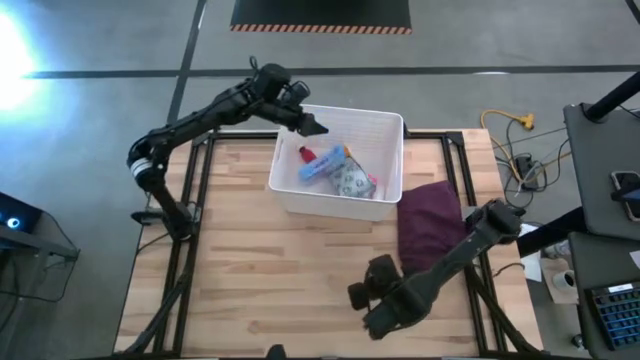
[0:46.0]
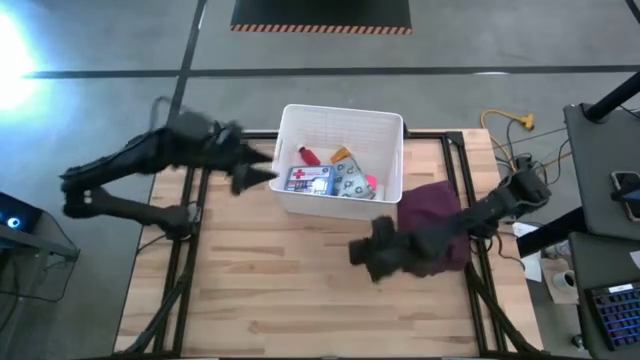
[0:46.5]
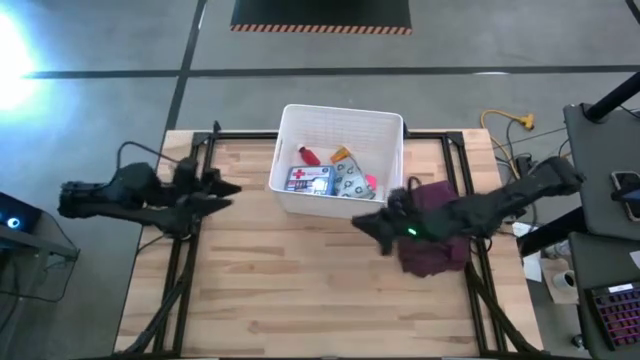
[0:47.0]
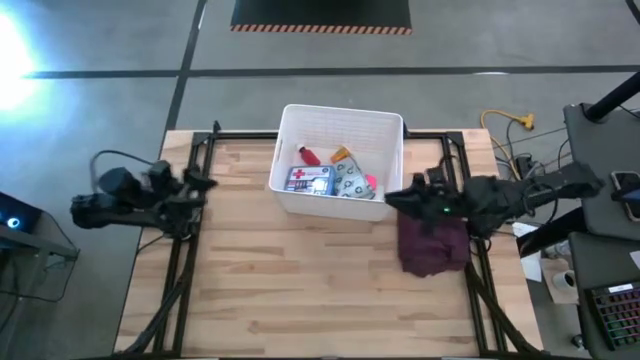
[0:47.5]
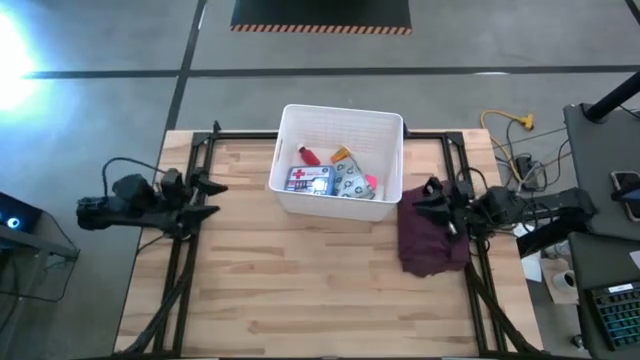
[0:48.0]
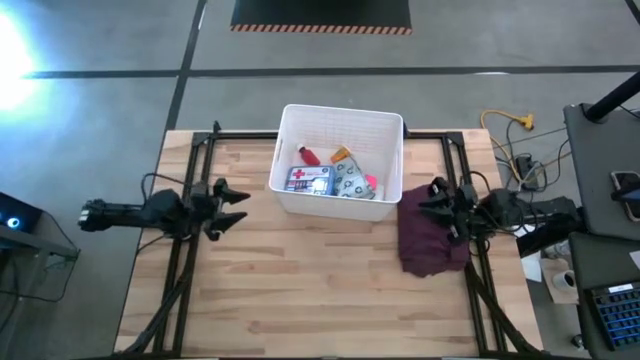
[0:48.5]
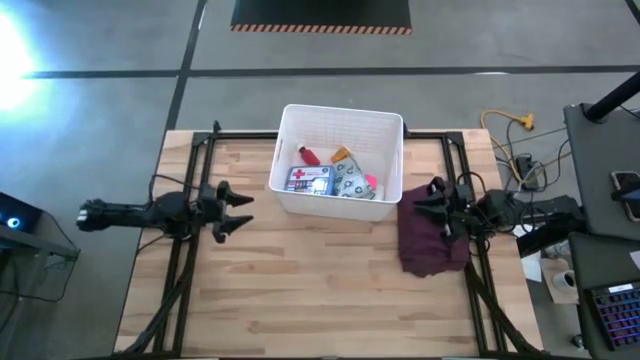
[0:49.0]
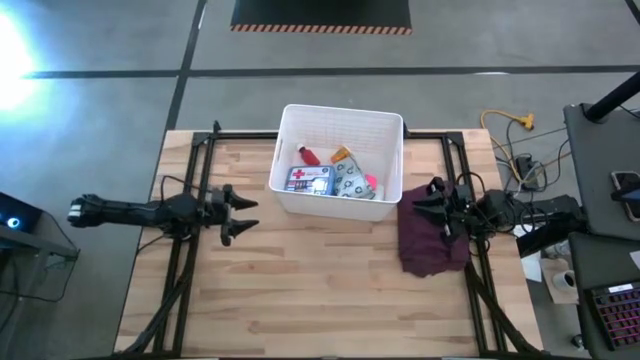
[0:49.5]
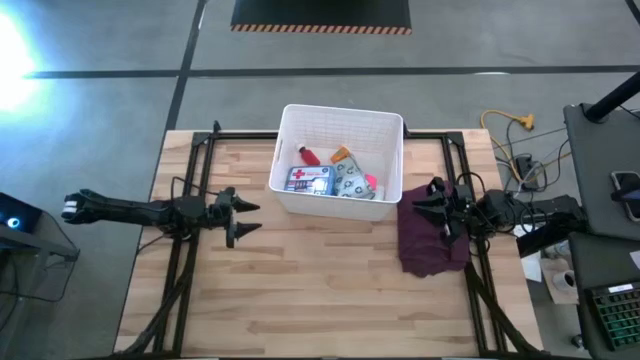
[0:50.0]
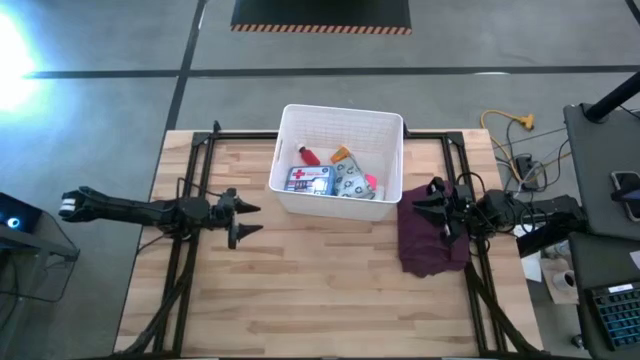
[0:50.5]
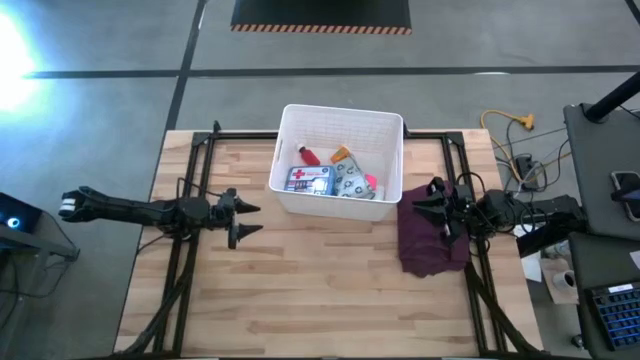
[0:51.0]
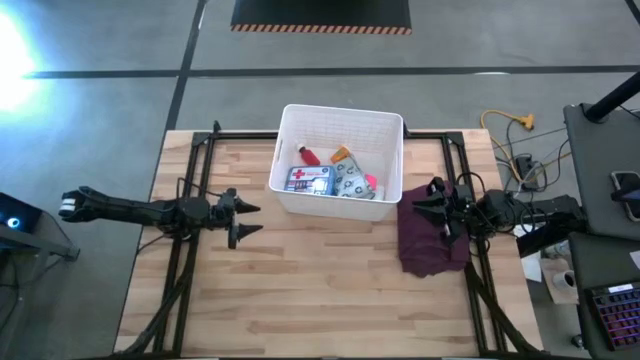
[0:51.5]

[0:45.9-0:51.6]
Task: Pick & place medical supplies in basket/bin
Return to Home Position

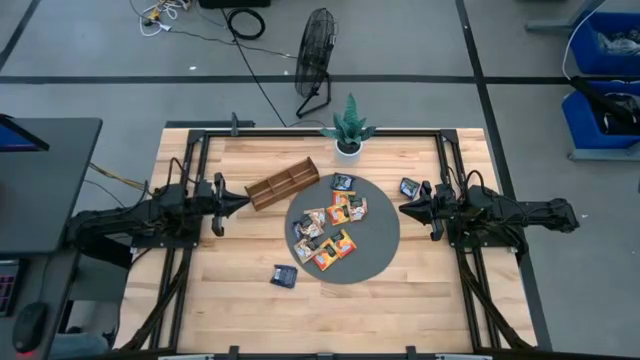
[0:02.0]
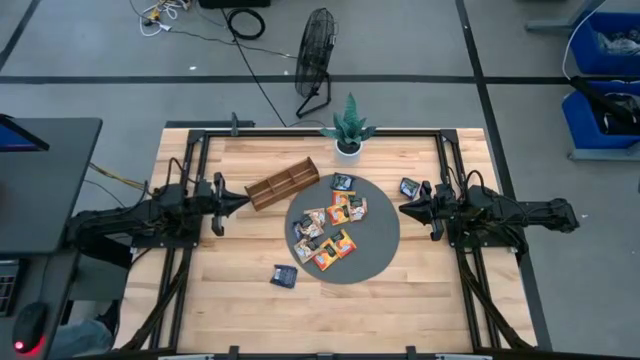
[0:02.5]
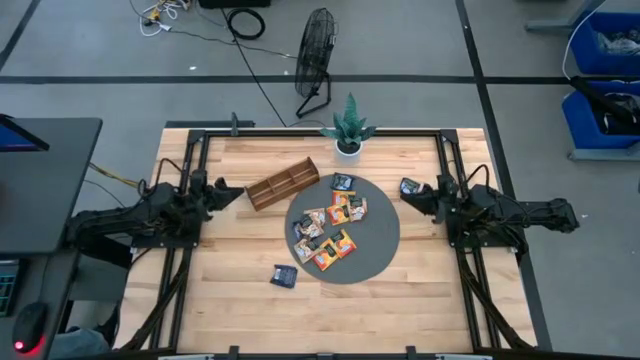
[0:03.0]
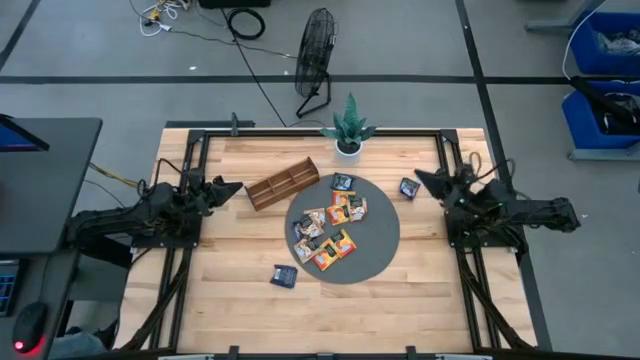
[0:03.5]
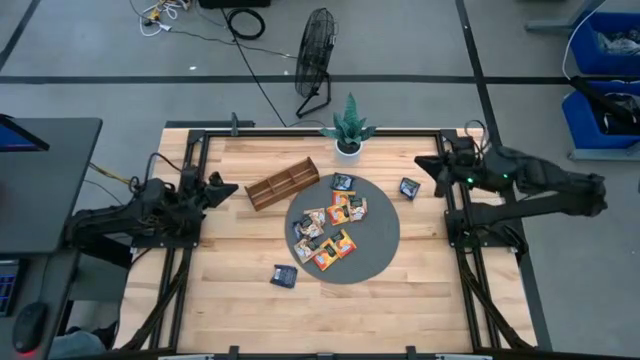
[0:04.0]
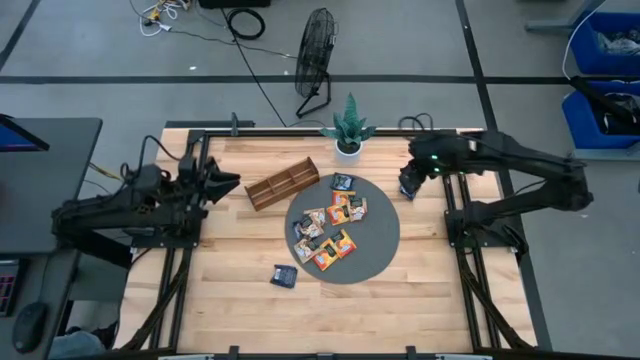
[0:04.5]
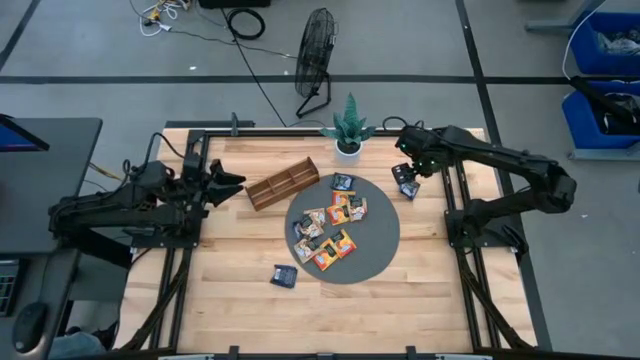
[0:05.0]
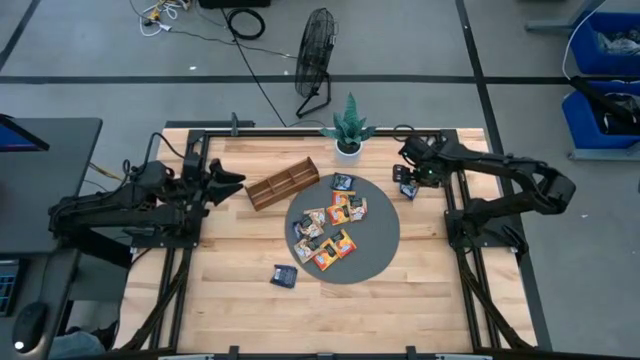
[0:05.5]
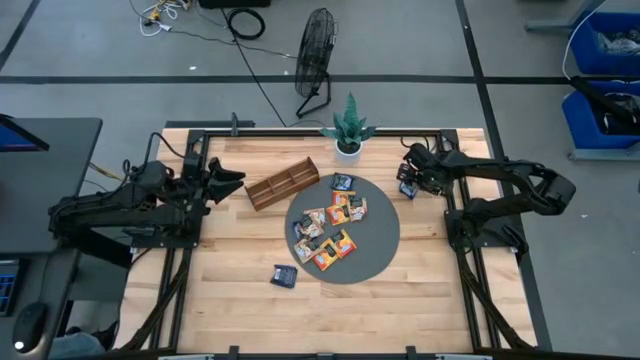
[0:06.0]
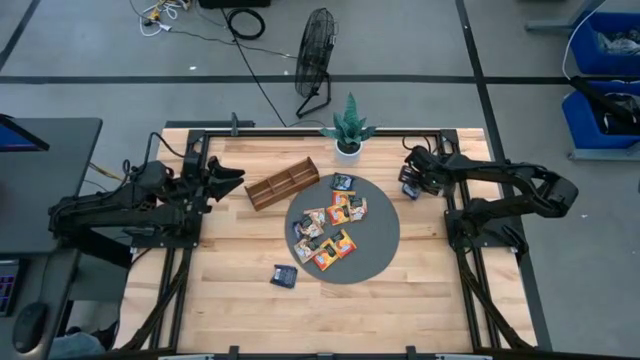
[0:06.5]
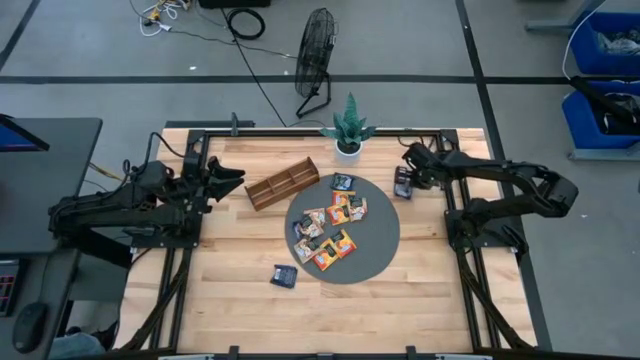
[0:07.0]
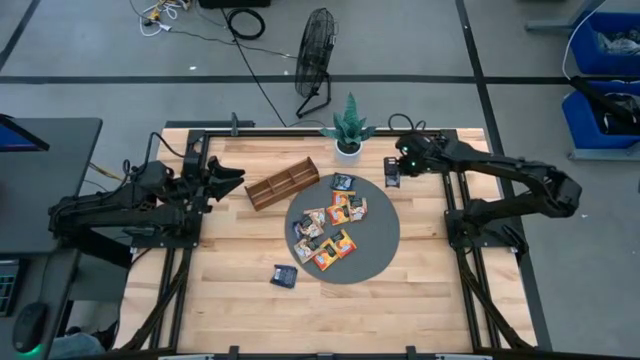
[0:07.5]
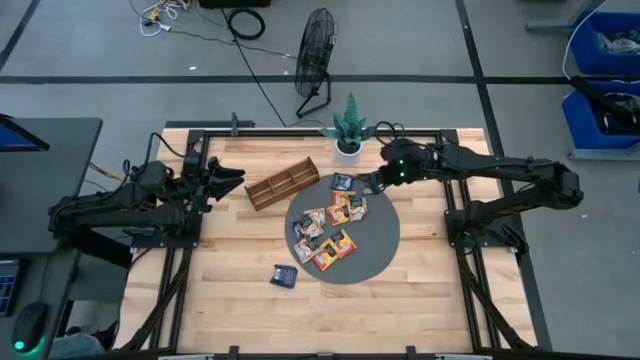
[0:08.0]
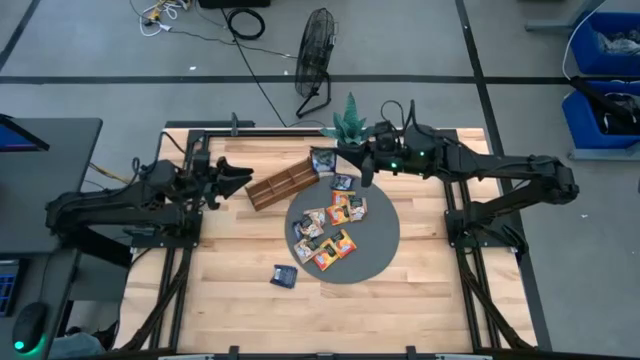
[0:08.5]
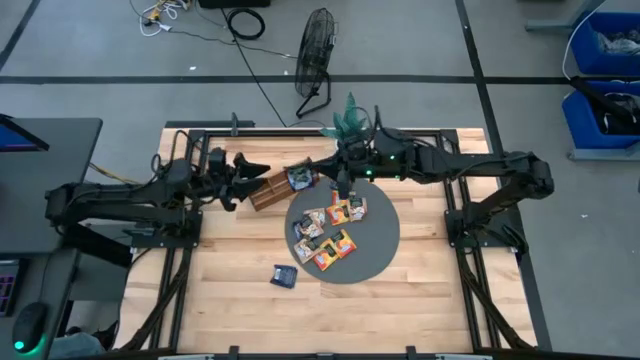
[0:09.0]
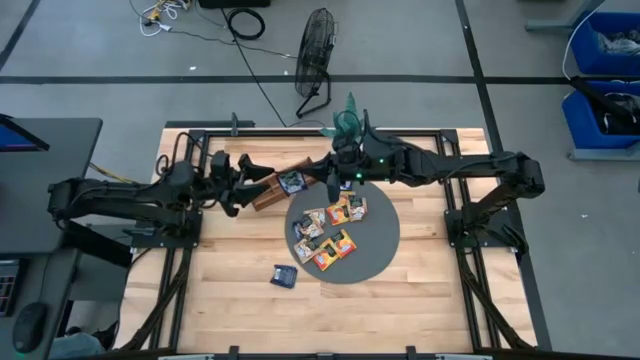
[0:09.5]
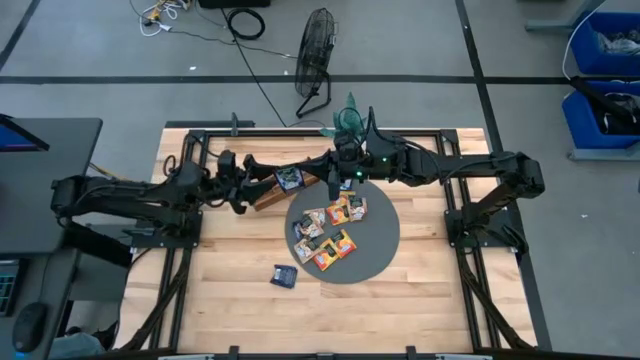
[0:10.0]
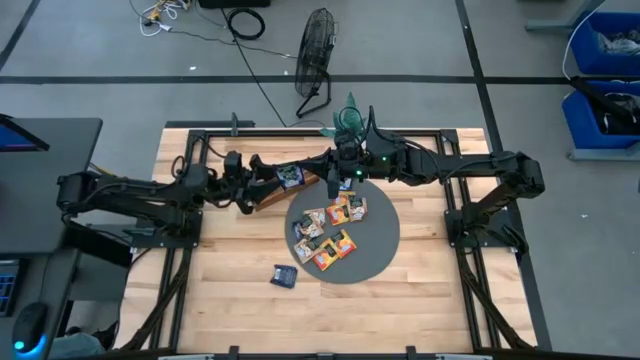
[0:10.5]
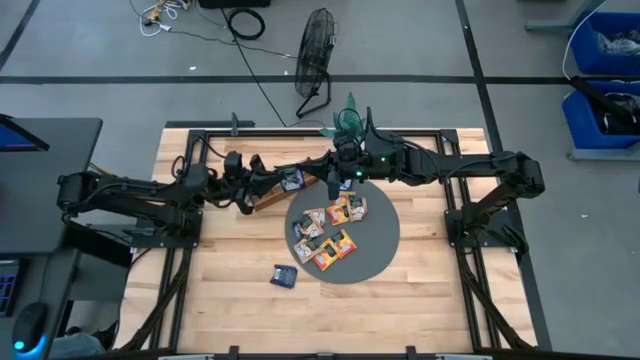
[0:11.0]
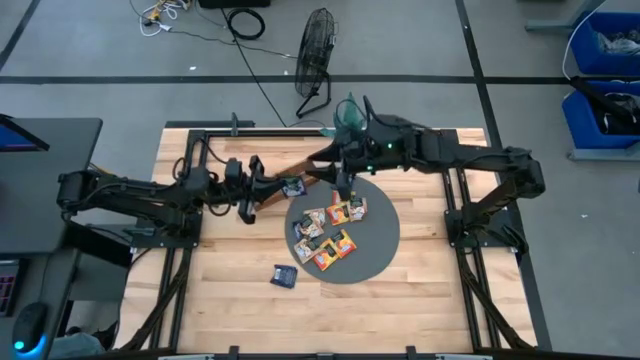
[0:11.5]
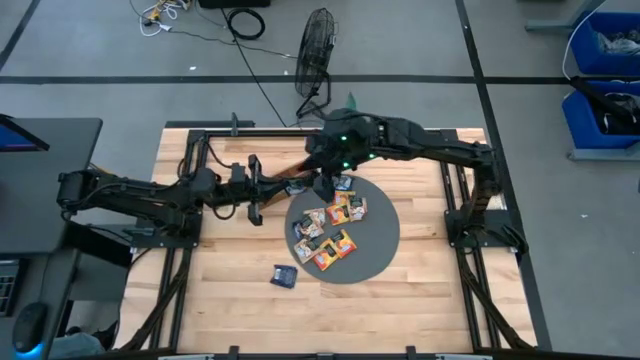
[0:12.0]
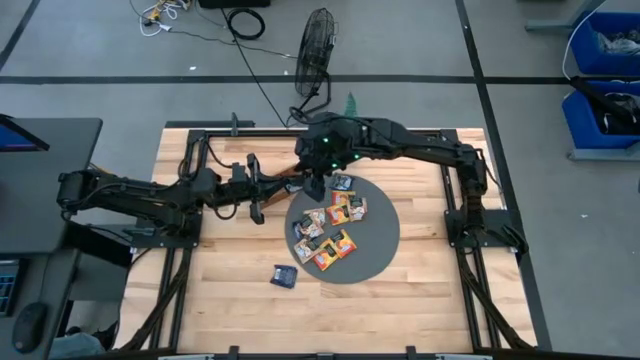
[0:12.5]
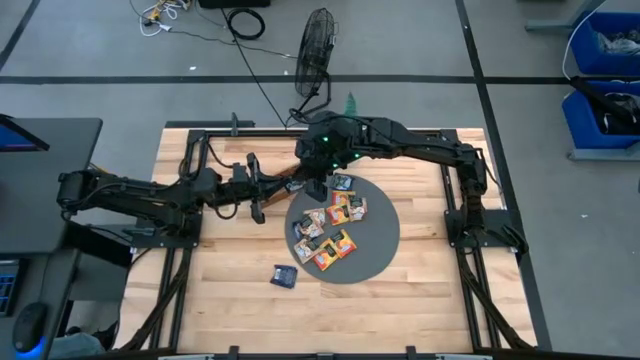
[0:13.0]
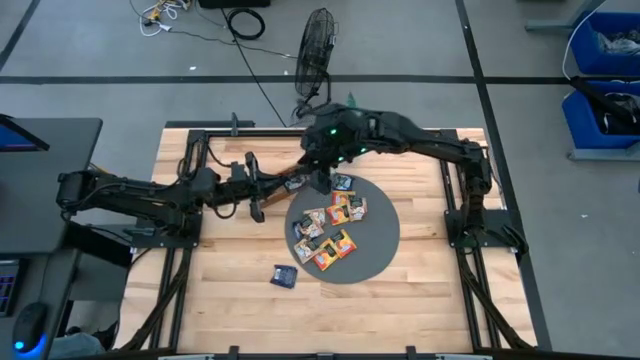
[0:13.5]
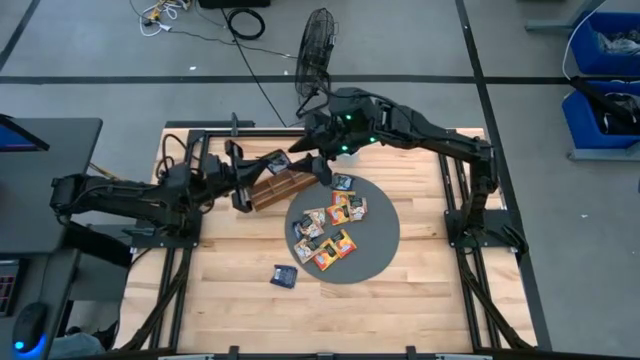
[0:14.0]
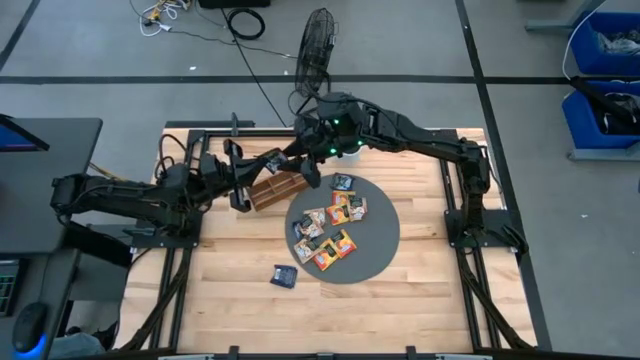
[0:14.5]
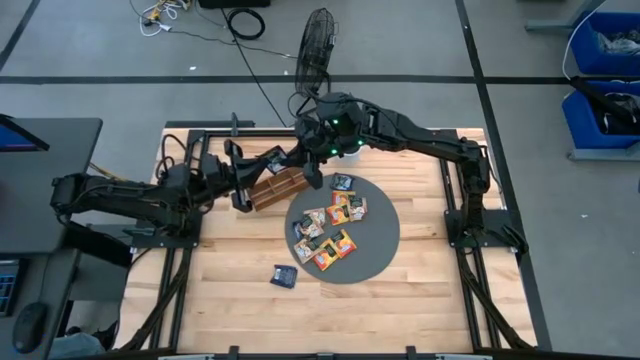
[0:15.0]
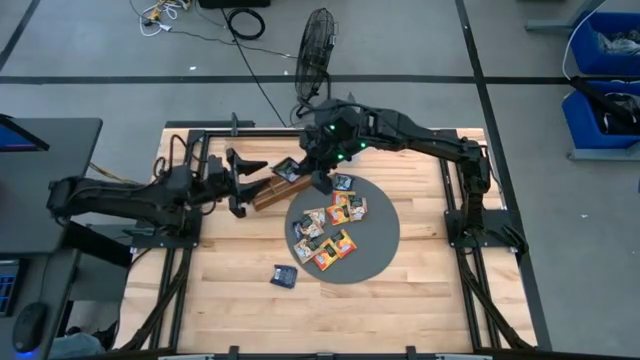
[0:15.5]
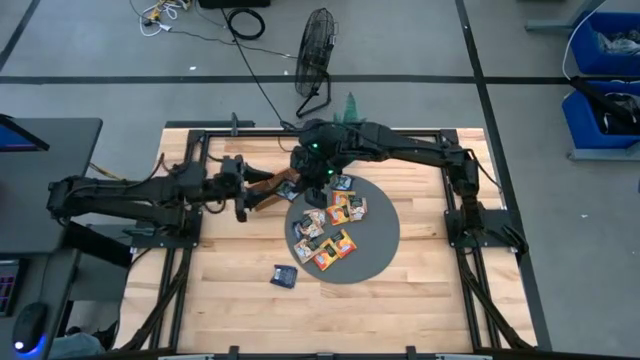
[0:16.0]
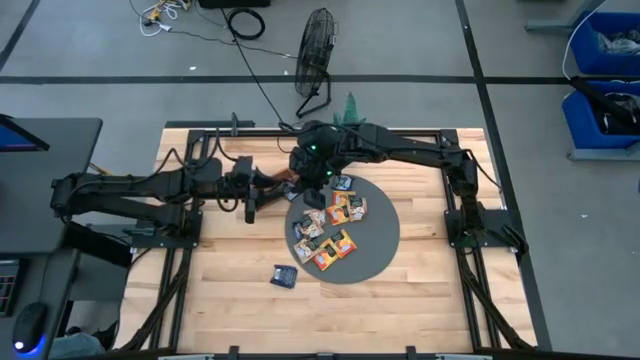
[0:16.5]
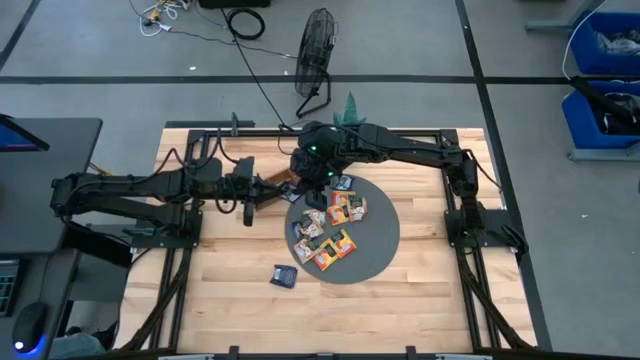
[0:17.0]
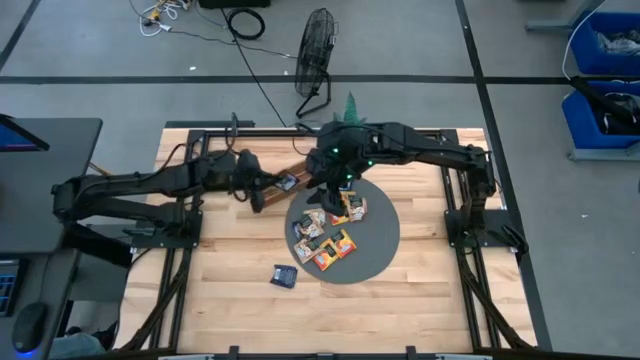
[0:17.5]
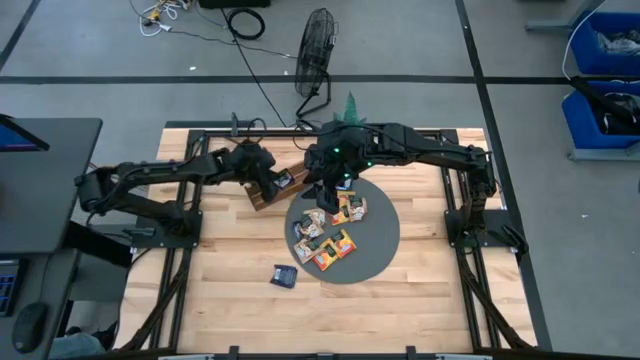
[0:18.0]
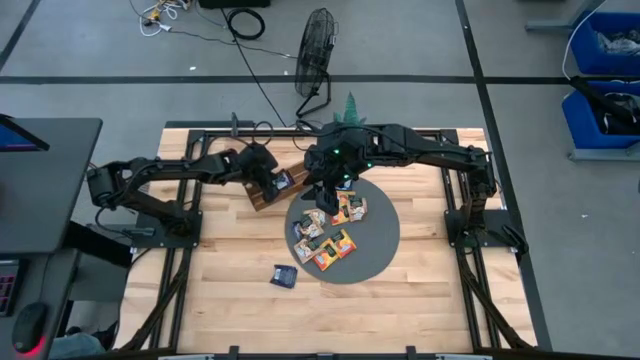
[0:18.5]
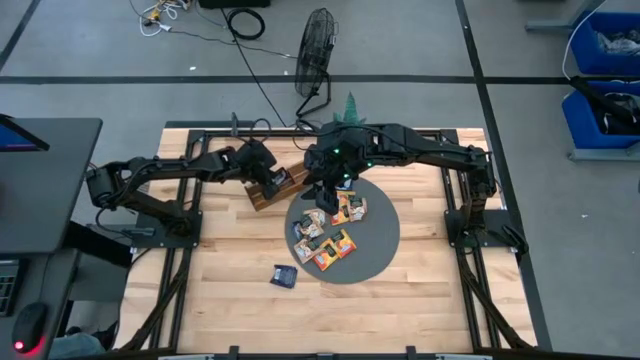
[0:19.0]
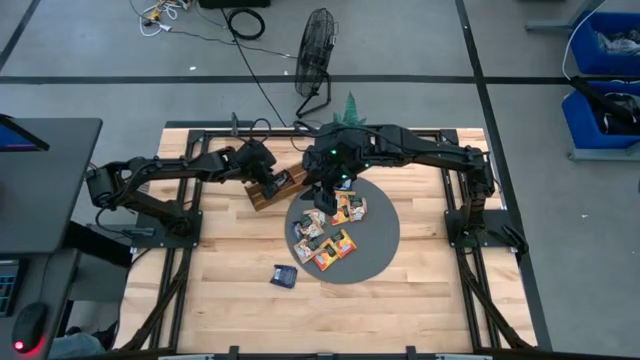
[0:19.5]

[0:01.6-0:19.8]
Task: Pick & Place Tea
Put the purple tea bag into the middle section of the wooden organizer
